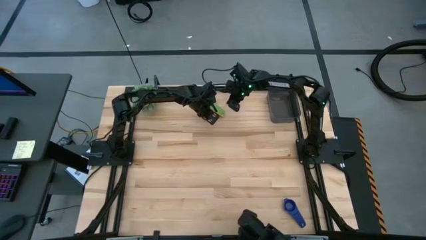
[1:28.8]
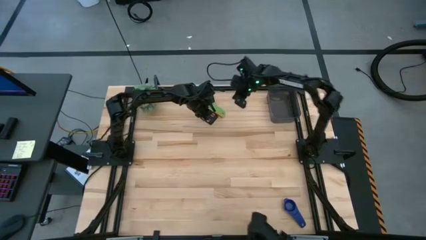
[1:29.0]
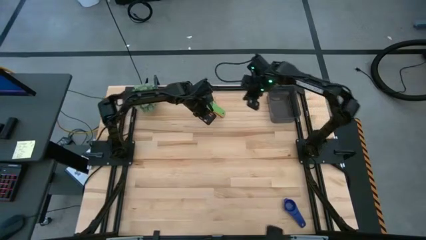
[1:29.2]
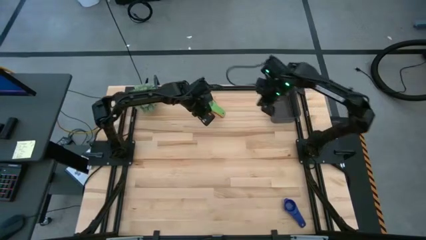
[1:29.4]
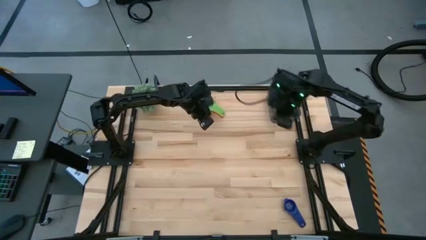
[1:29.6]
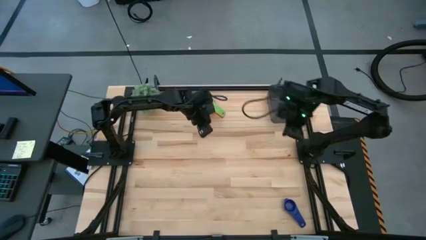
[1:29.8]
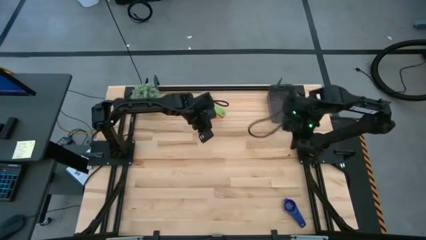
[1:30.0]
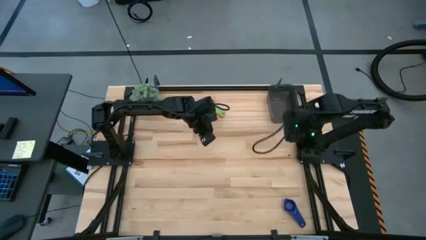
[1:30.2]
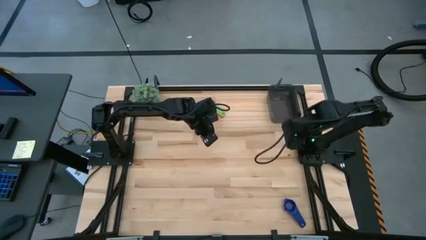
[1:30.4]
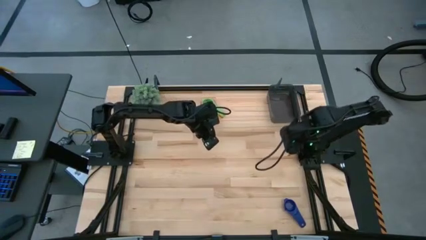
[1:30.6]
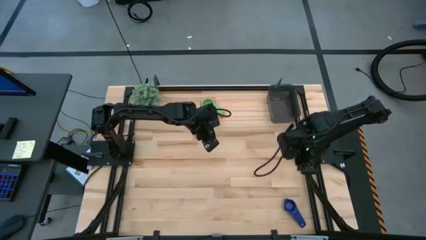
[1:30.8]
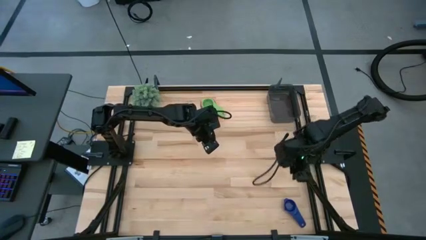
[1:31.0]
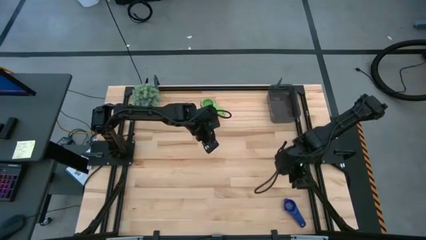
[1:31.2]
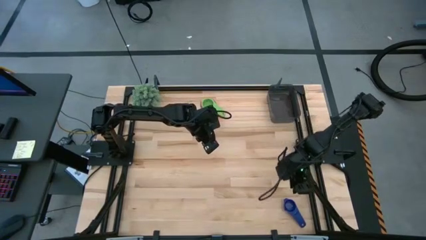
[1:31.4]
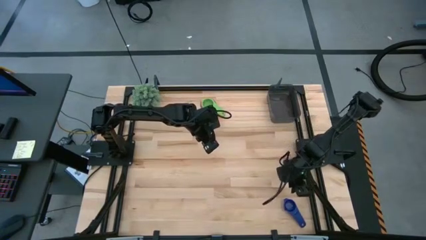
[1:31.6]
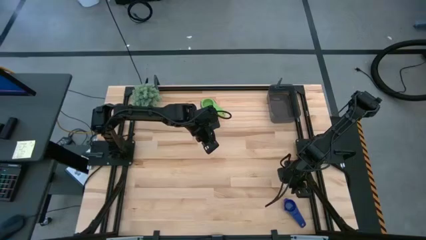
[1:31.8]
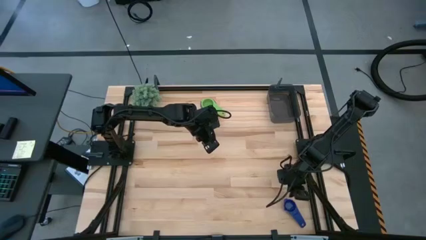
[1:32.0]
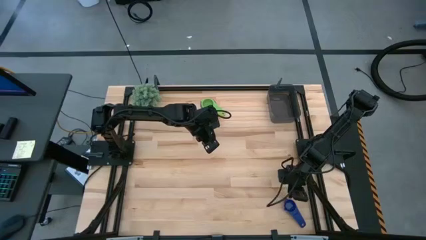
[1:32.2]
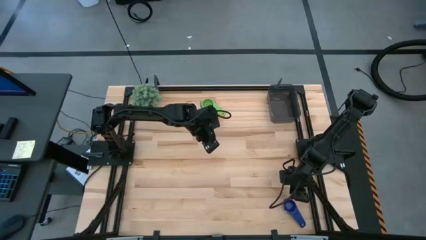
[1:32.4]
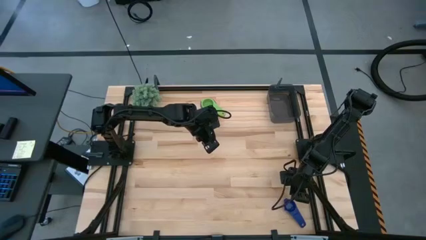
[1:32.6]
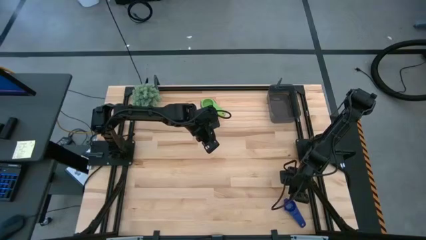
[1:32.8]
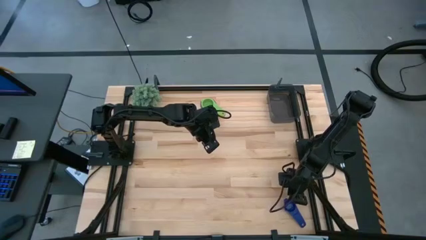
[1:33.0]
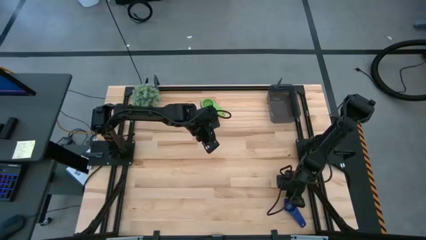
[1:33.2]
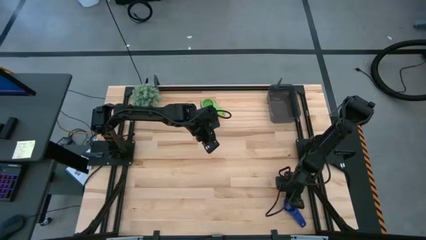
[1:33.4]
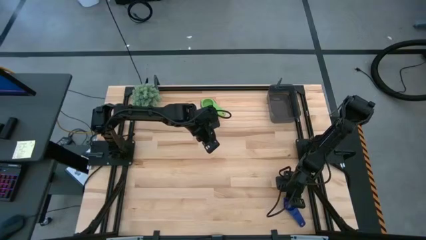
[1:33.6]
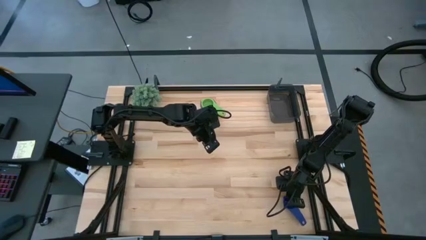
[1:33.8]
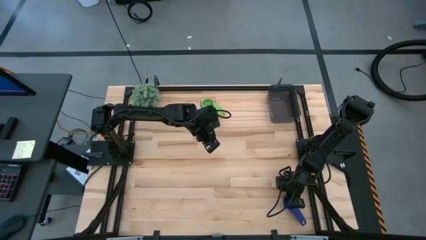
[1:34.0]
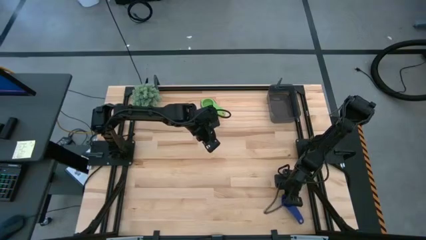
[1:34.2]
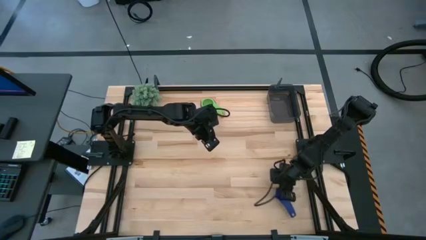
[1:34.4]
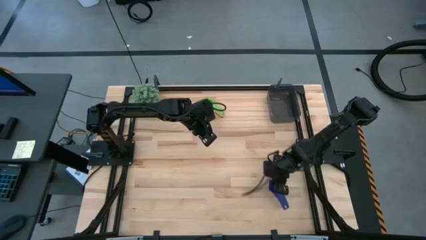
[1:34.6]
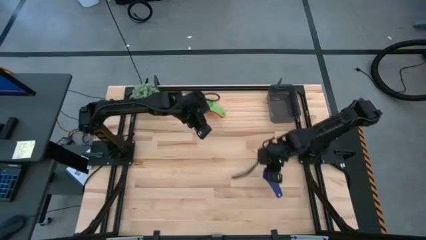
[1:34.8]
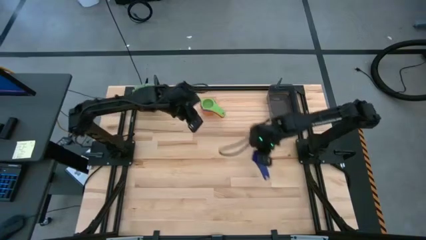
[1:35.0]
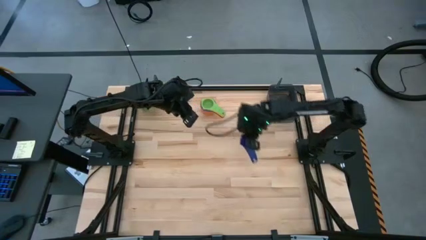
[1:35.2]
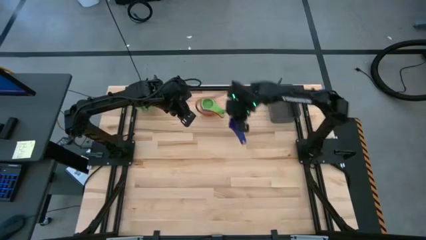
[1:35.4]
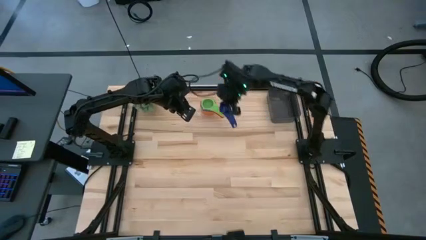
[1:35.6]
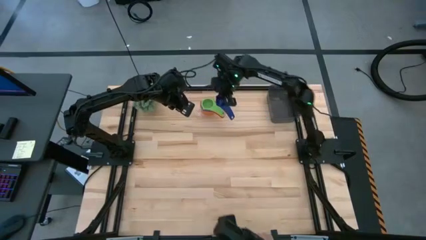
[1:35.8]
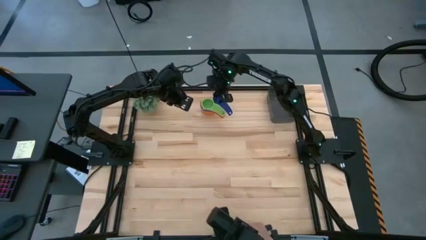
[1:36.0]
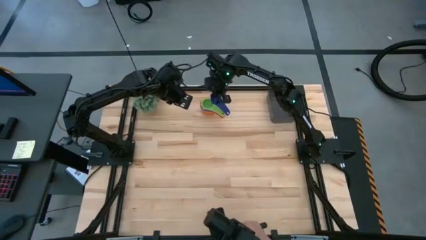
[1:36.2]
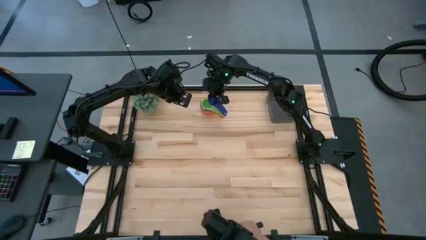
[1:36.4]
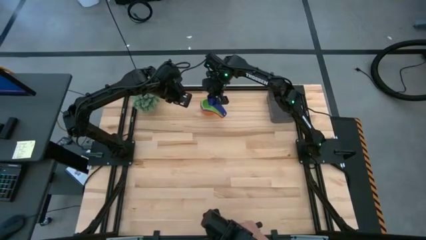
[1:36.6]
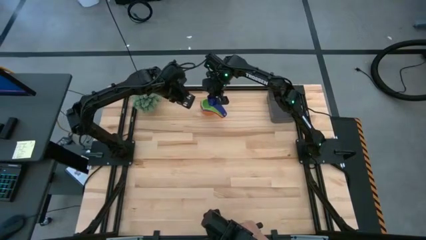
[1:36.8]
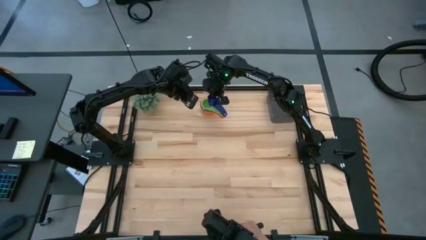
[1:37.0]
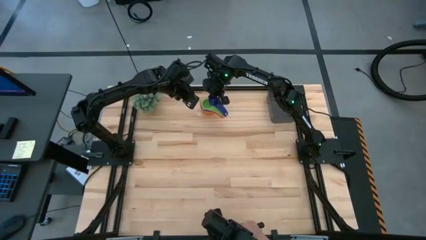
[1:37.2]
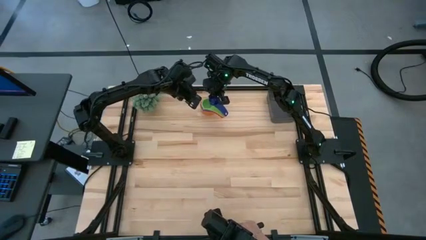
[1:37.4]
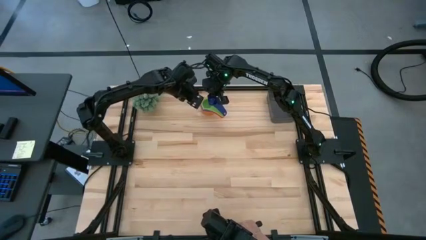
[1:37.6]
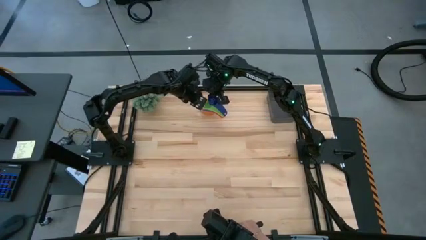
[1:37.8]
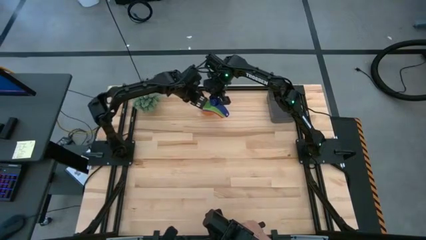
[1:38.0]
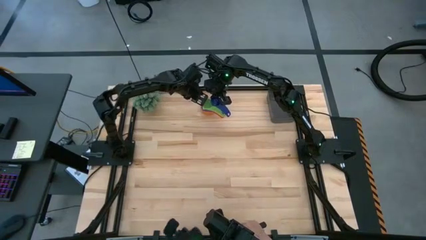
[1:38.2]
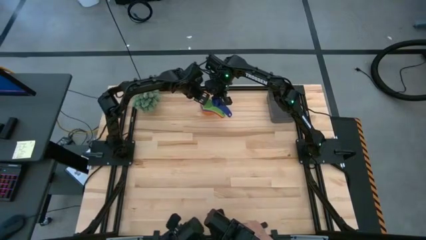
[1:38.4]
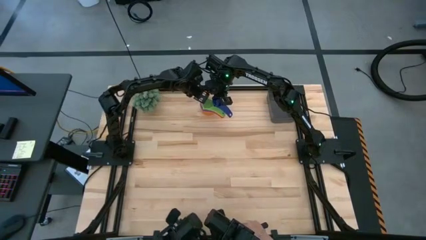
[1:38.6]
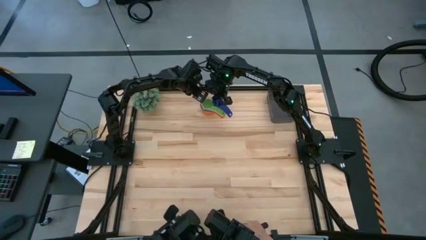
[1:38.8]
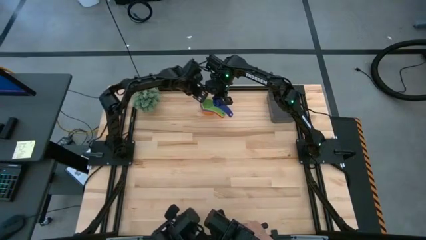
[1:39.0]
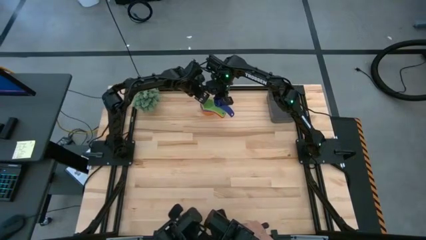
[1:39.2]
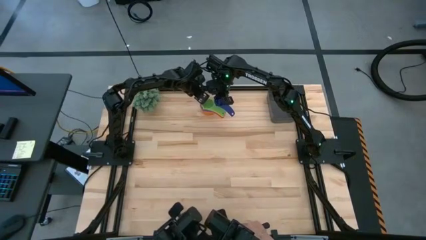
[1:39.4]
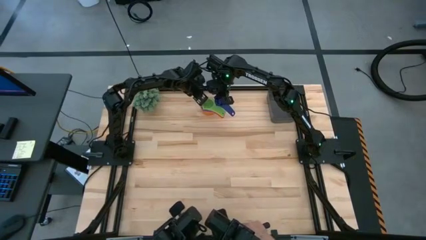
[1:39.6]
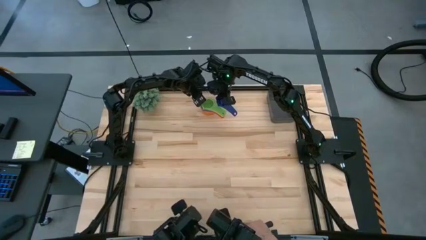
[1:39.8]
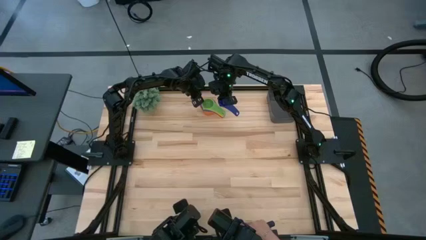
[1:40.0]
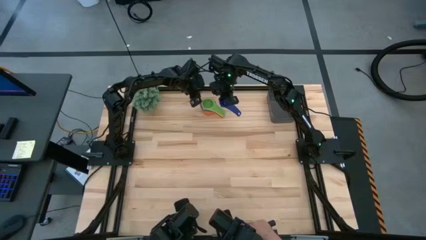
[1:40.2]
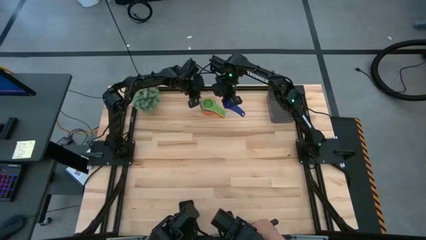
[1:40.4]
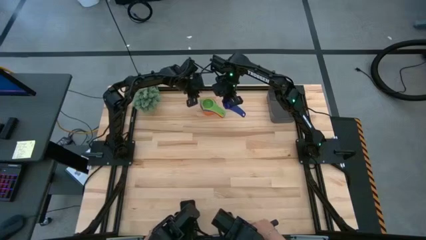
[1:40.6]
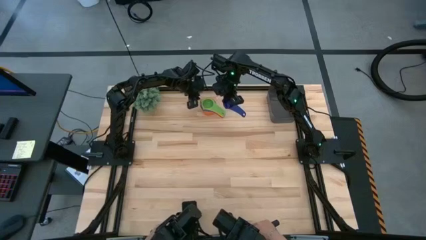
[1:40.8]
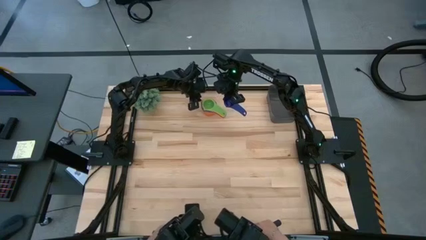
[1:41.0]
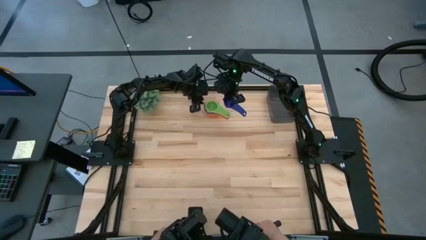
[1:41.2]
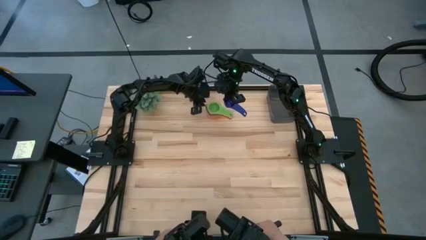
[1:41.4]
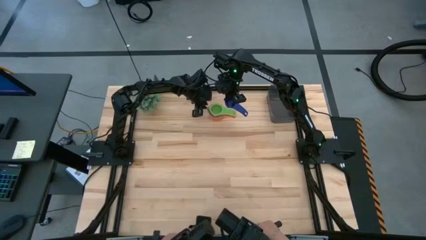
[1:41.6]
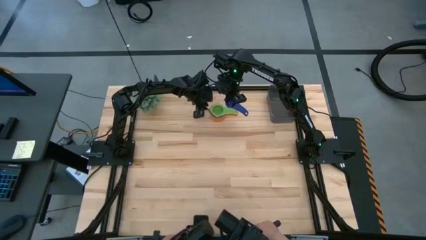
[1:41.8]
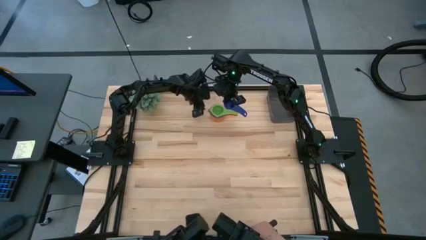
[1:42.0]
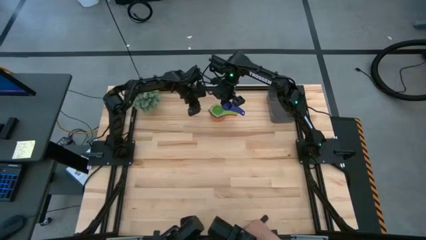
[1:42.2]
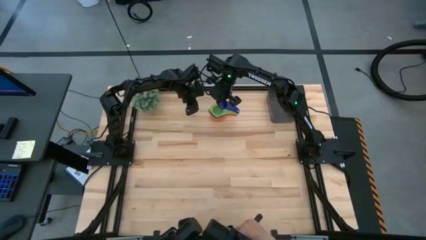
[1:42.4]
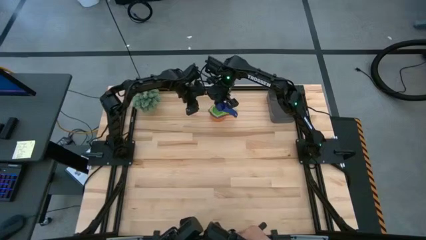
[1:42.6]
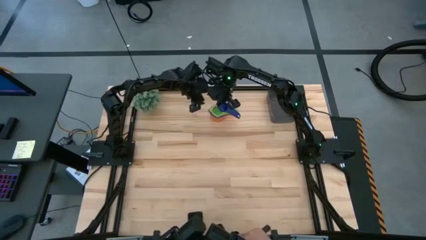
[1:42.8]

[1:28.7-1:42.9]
Task: Nest measuring cups in basket
Stack the dark blue measuring cup on the stacked green measuring cup

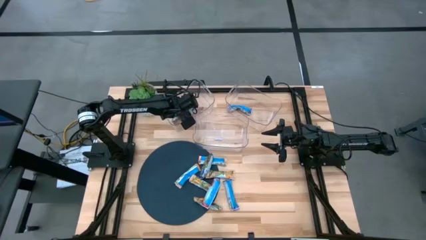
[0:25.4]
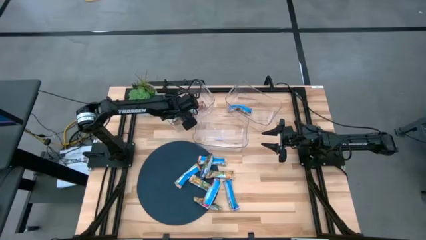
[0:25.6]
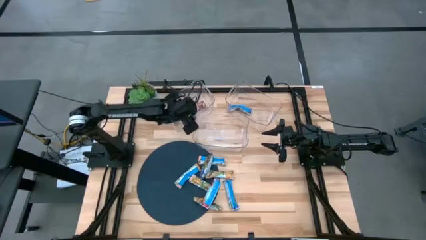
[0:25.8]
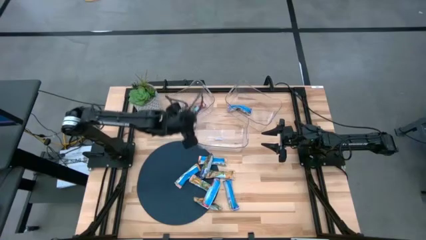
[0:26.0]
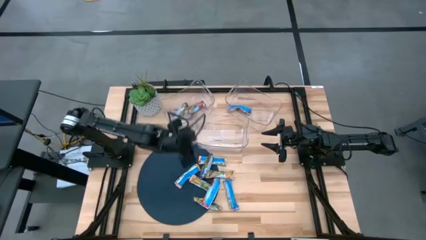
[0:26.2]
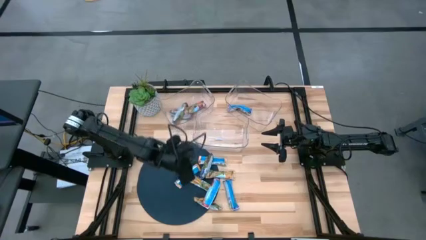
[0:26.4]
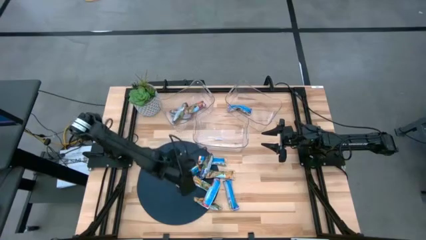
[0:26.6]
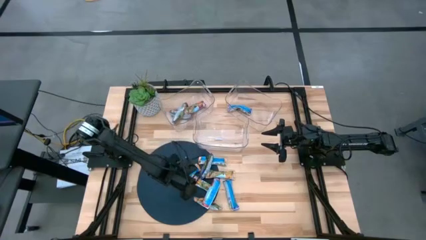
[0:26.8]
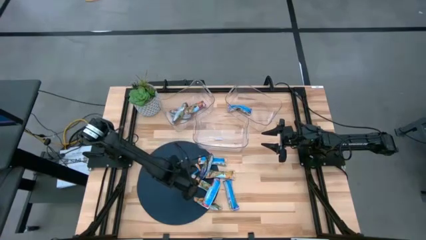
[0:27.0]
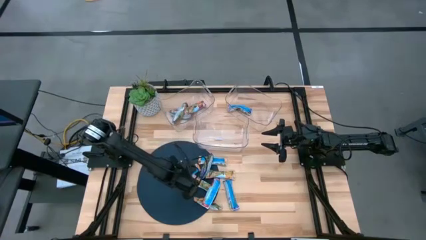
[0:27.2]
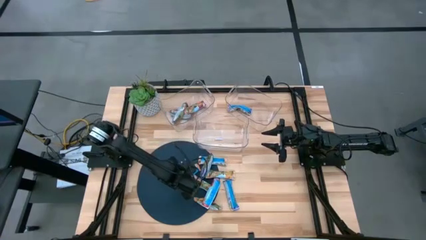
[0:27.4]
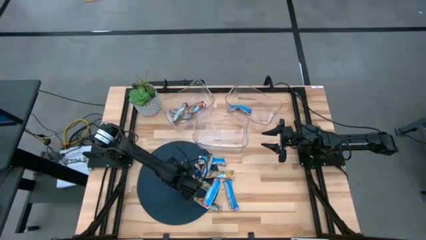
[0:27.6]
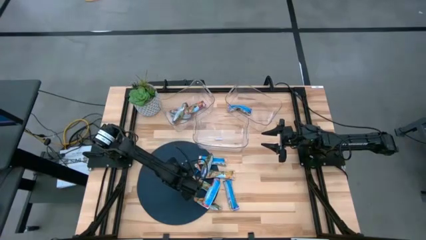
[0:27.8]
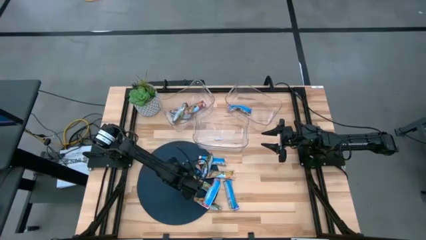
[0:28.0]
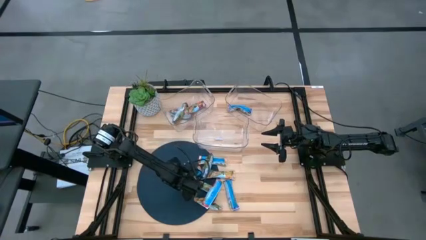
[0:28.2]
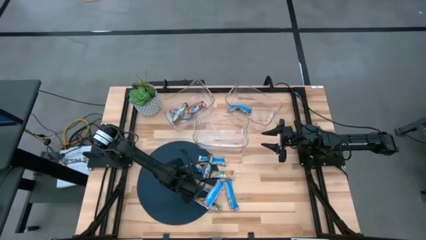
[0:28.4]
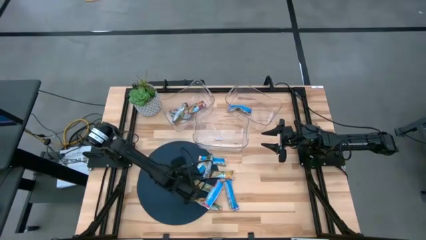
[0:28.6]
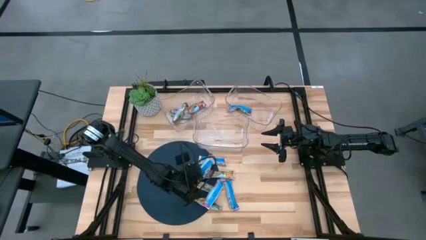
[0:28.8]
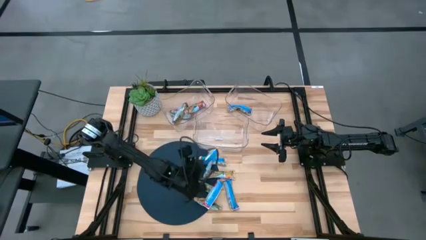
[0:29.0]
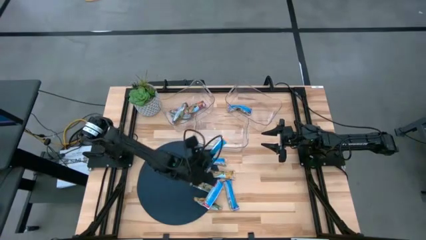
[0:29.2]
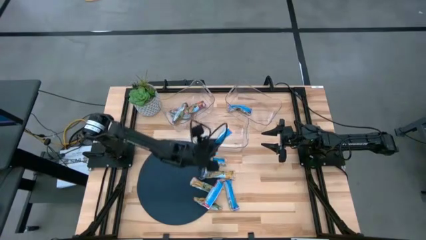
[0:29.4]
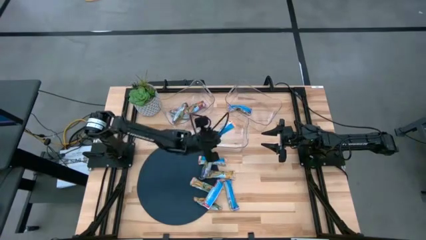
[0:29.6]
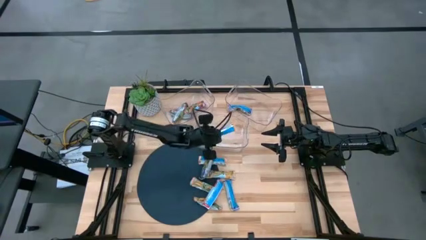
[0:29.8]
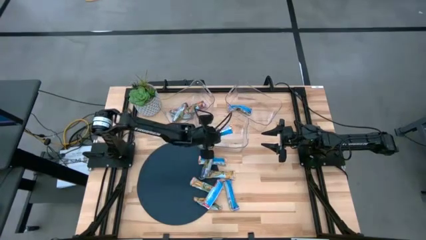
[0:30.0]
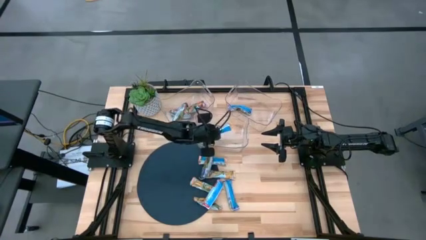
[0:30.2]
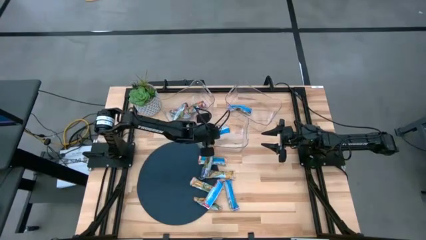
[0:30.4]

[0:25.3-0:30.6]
Task: Pick and place Granola Bars by type
Put the yellow granola bar into the middle transparent bin
